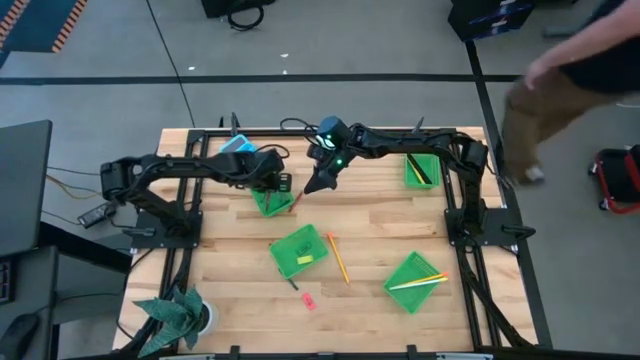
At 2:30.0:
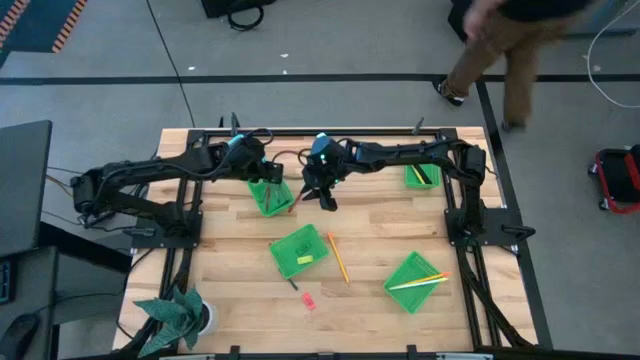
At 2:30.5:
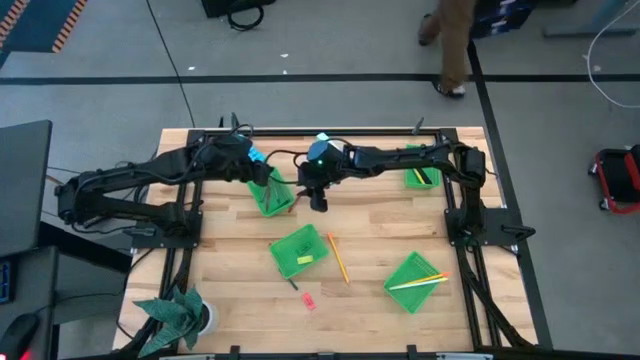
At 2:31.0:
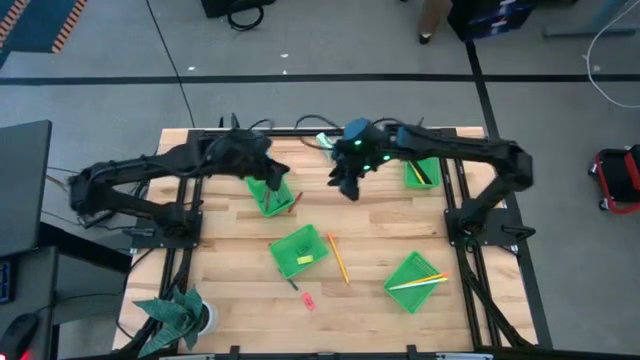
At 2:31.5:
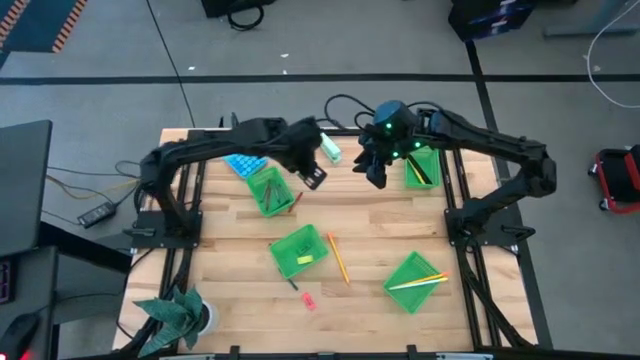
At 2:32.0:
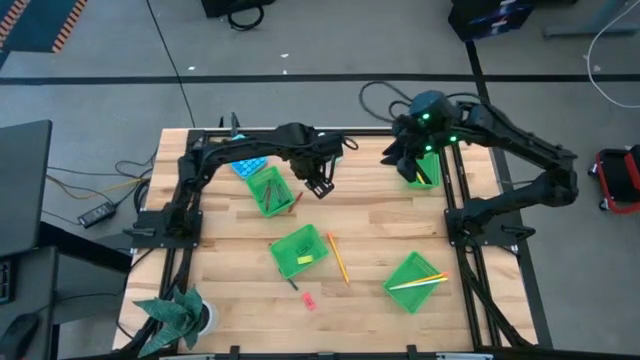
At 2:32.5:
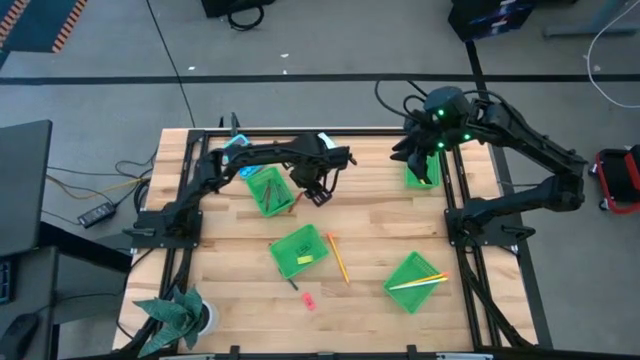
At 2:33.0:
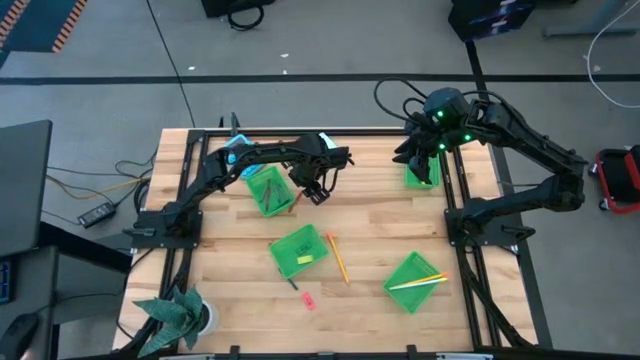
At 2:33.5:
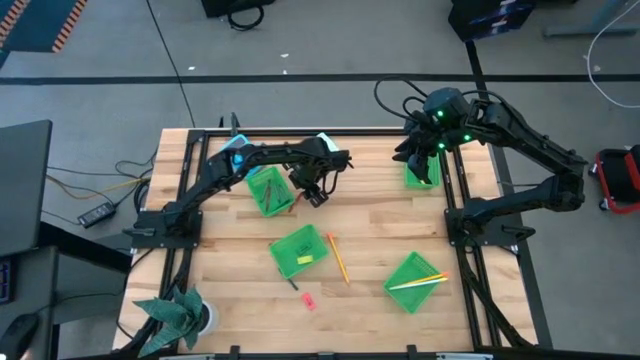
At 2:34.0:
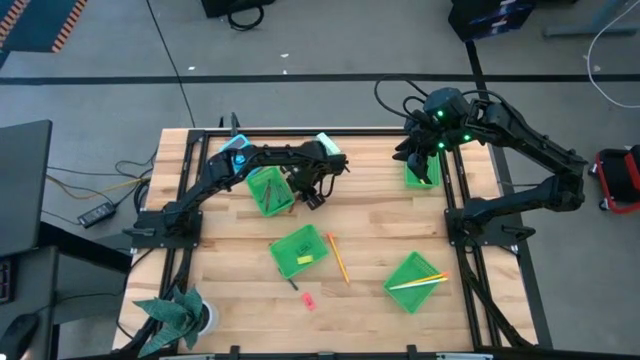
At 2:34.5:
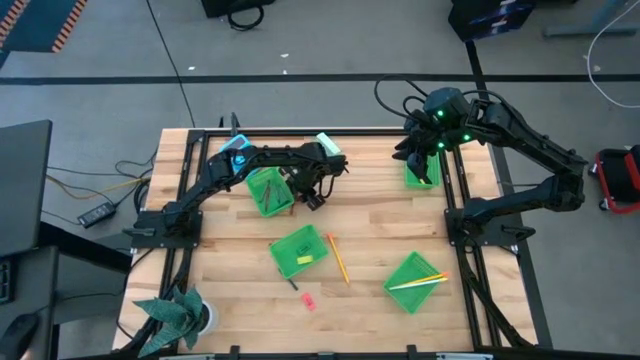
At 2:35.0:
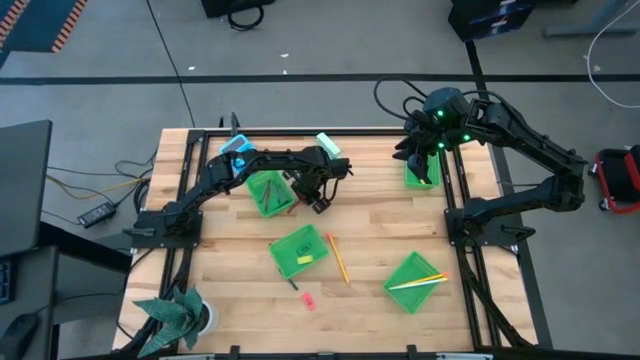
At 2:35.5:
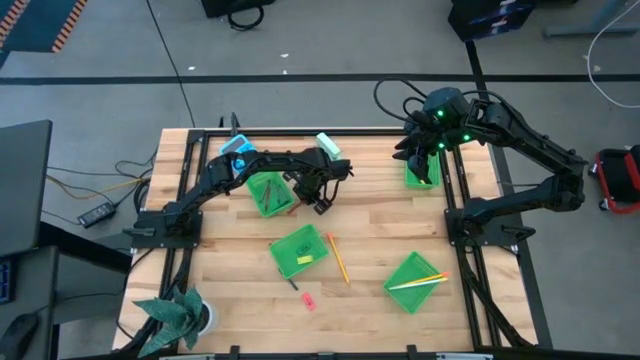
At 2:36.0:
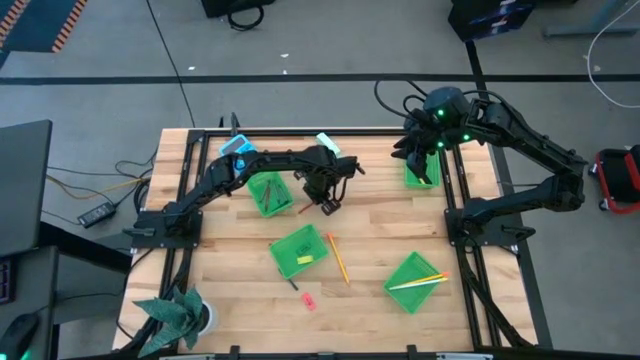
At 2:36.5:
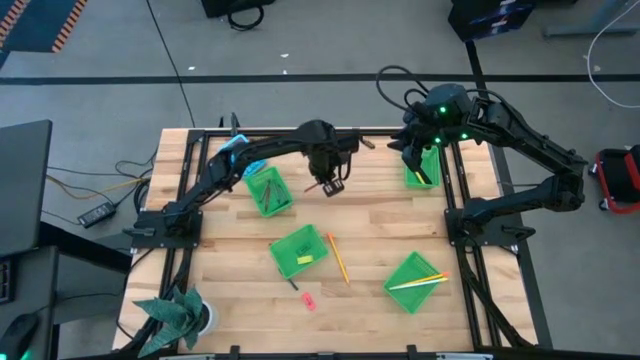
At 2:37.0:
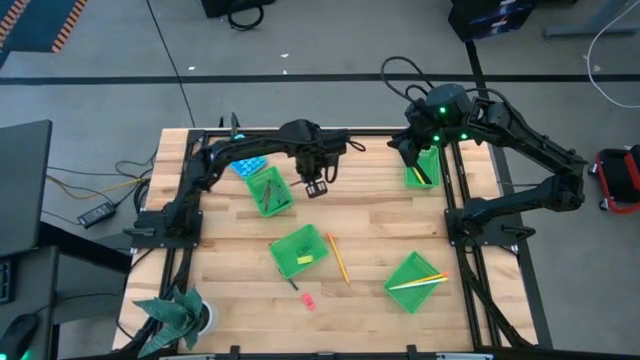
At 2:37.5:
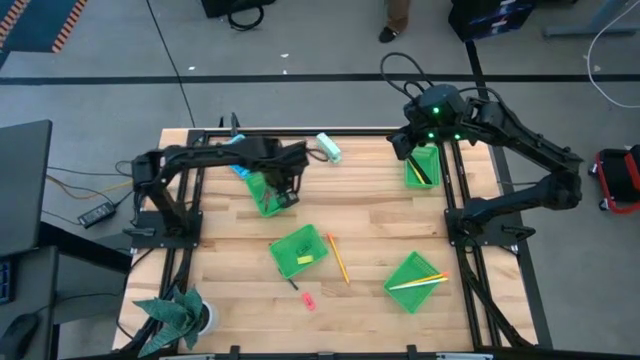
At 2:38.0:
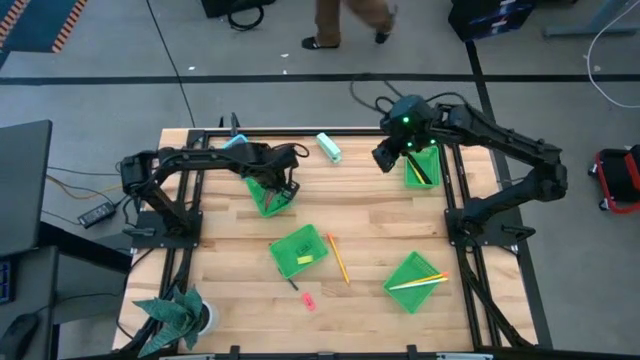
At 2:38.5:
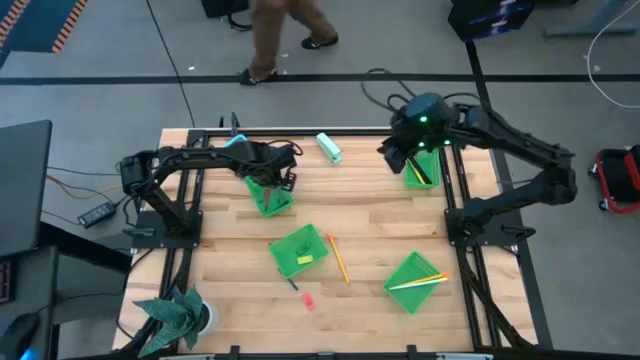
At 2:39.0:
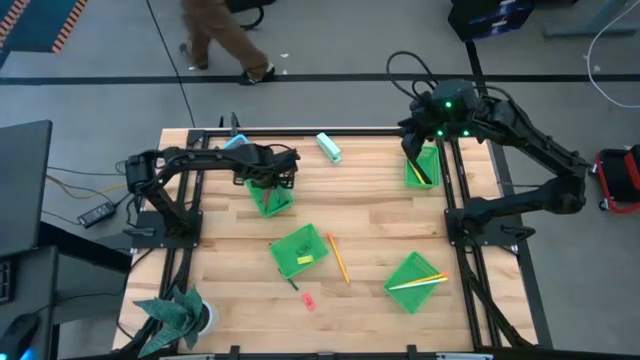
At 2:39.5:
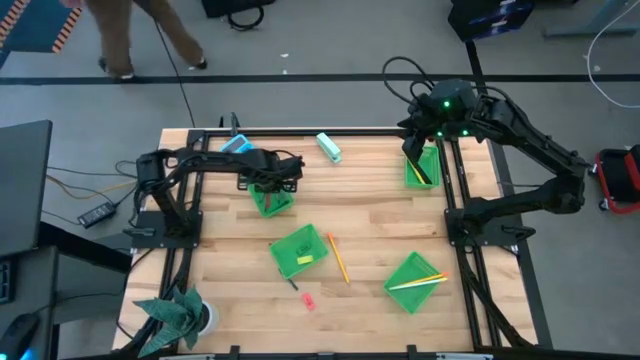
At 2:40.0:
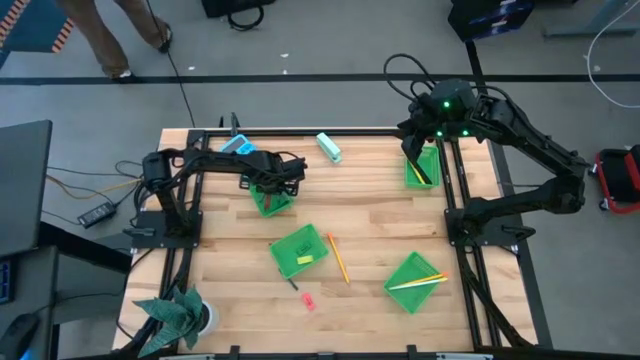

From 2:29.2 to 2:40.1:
Task: Sort crayons/erasers/pens/pencils in bins
Put the top red crayon into the top left green bin

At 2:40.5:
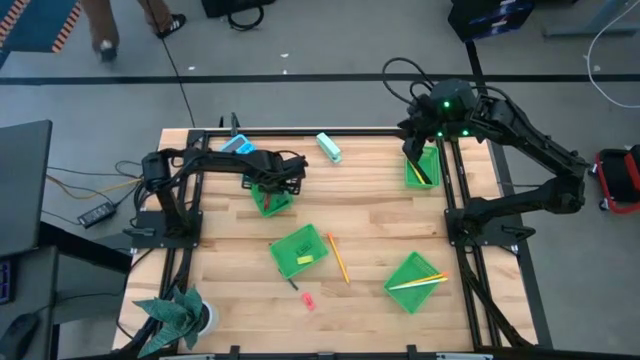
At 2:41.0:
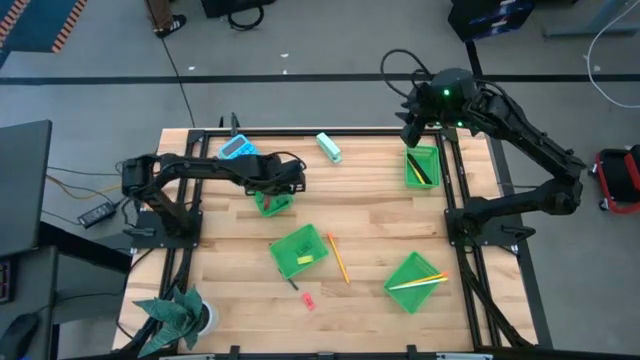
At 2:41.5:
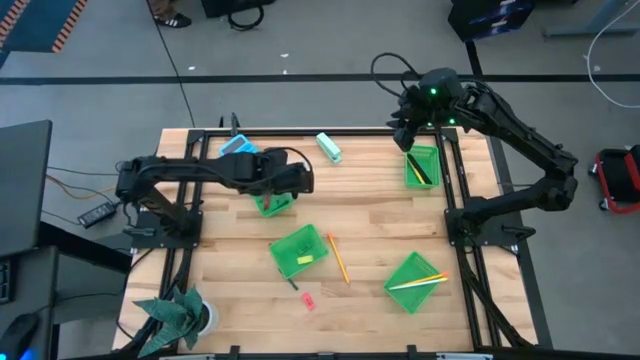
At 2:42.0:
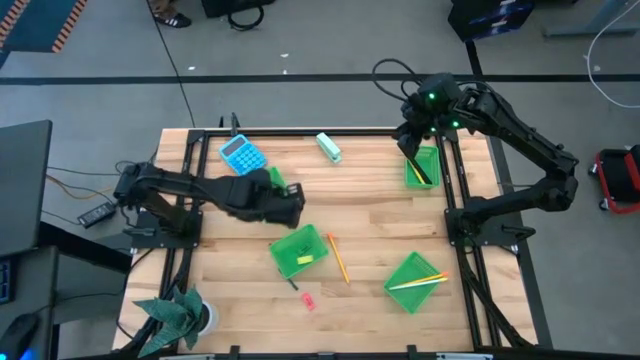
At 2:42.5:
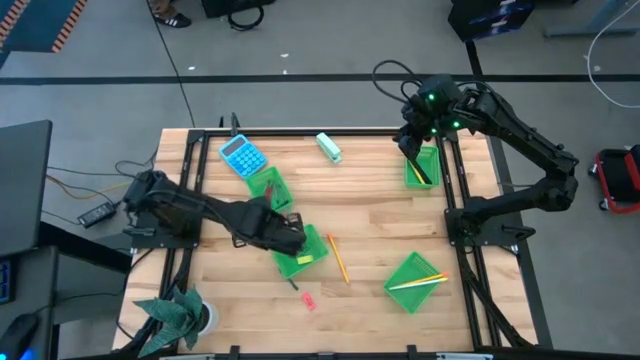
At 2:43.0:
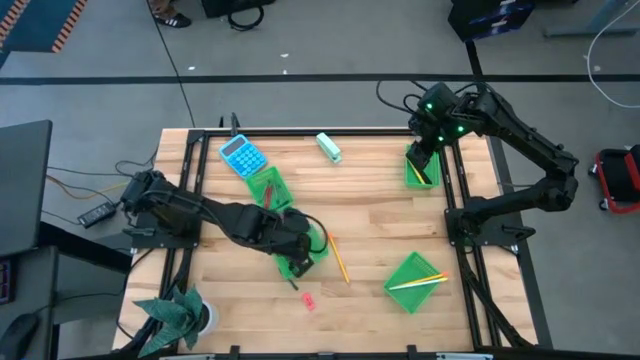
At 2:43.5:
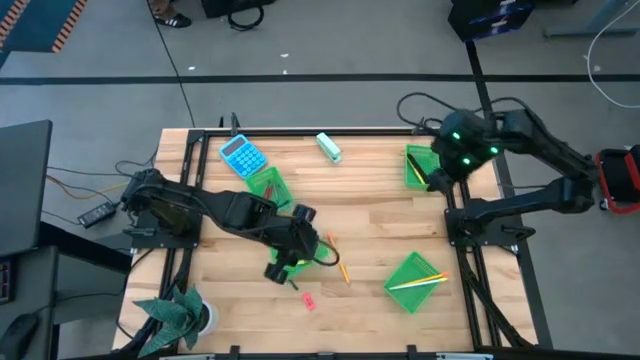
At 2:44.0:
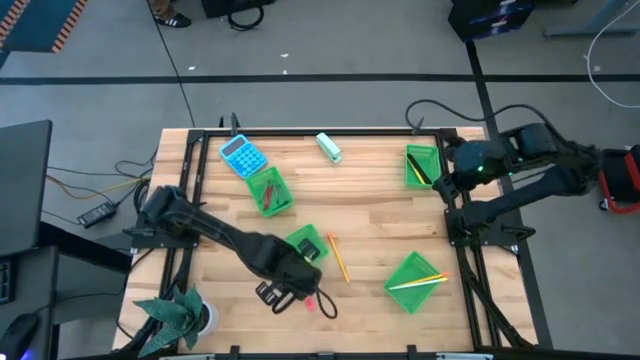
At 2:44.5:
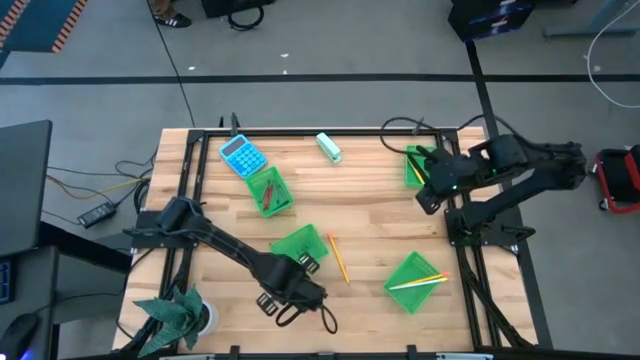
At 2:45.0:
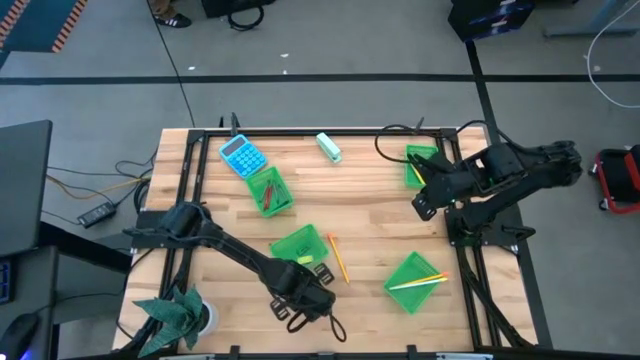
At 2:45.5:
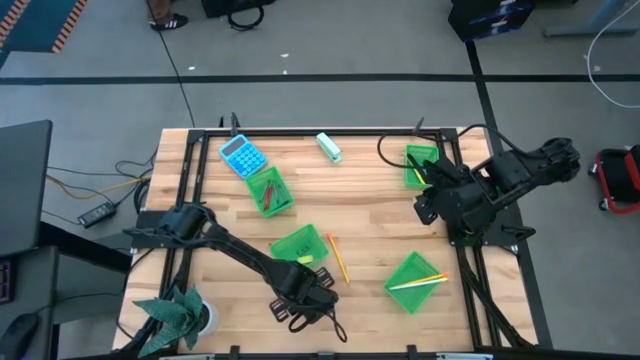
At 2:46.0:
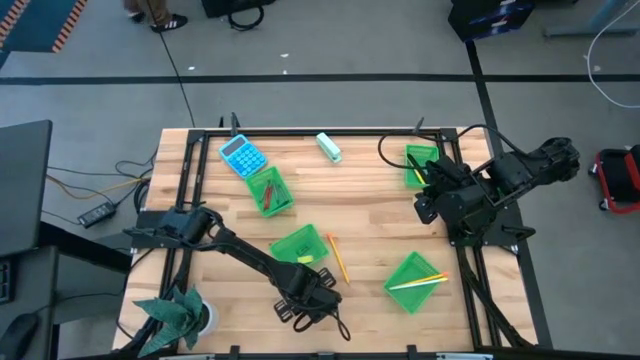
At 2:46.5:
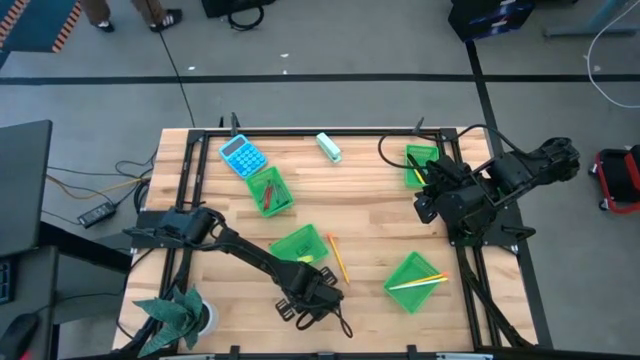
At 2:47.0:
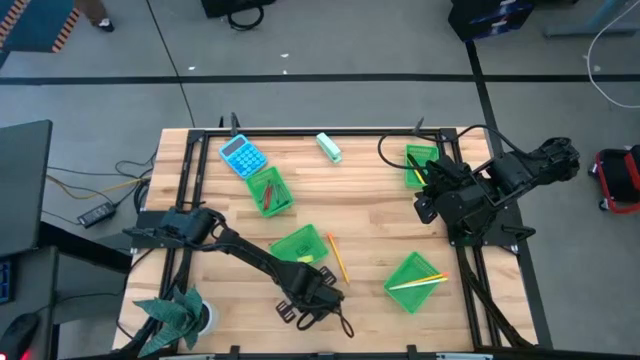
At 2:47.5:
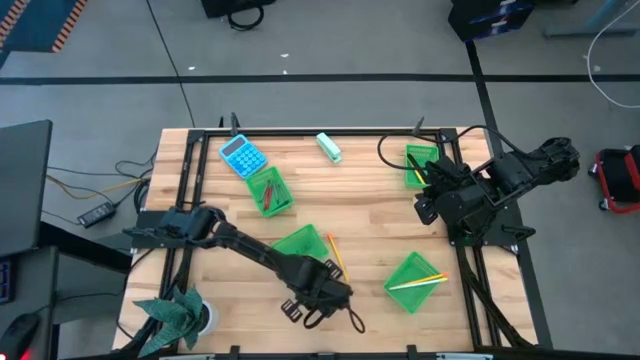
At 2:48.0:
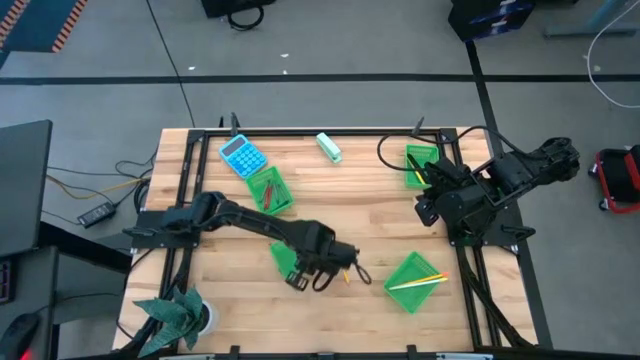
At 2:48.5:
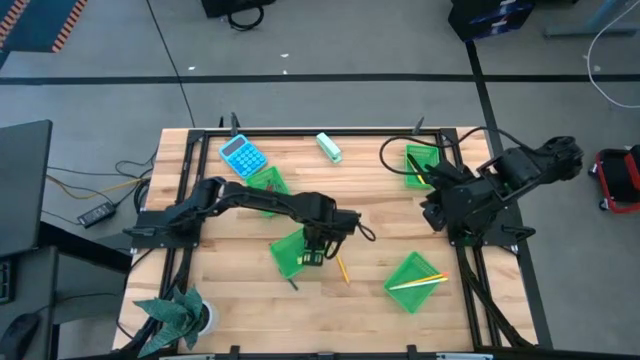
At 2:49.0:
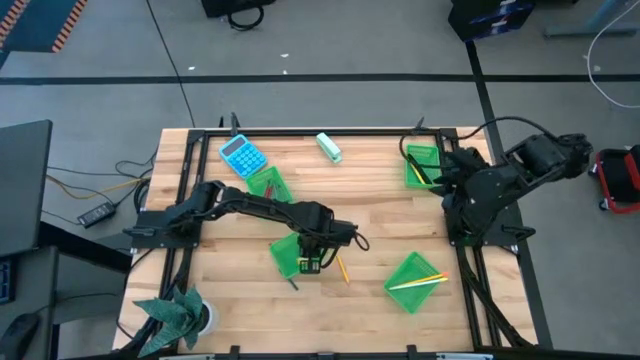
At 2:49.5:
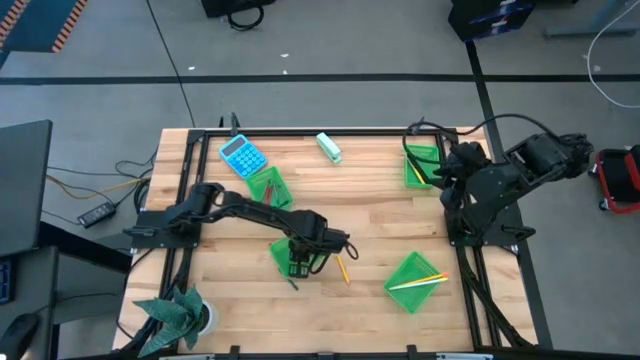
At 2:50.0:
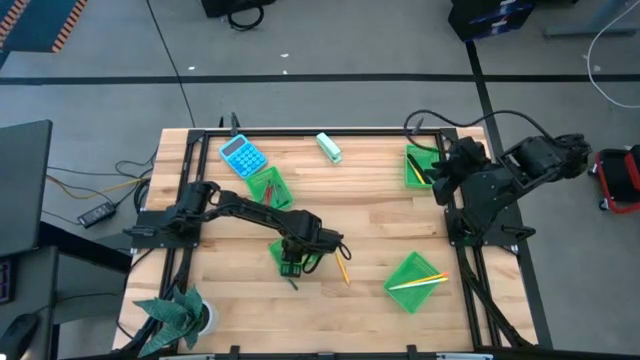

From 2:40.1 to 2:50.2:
Put the pink eraser into the bottom left green bin
